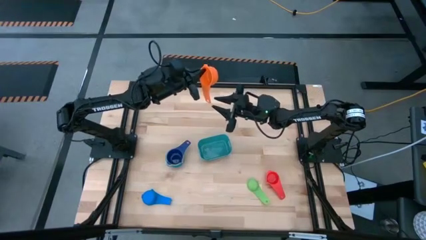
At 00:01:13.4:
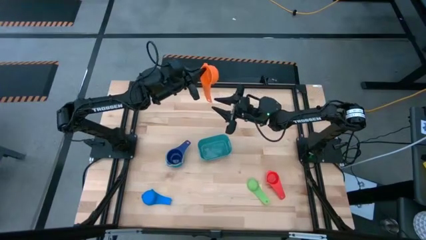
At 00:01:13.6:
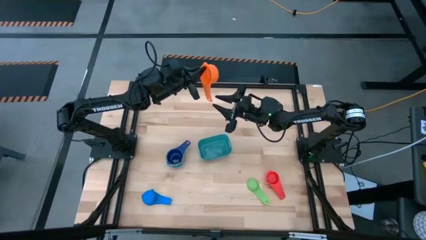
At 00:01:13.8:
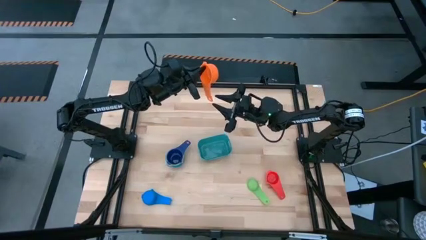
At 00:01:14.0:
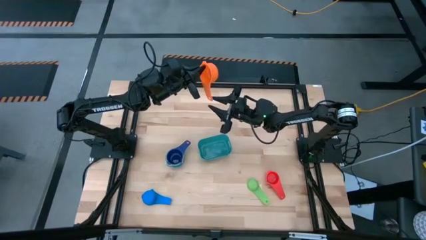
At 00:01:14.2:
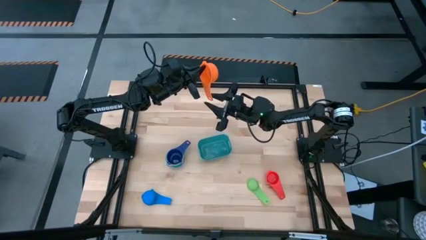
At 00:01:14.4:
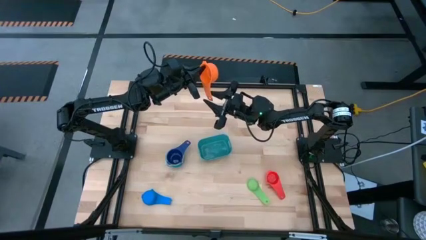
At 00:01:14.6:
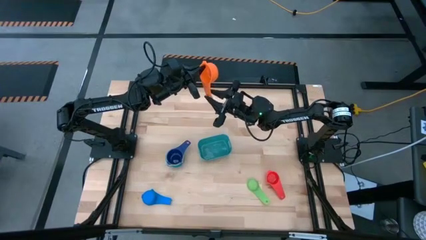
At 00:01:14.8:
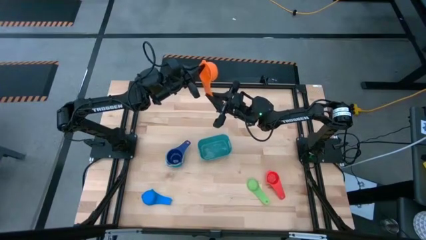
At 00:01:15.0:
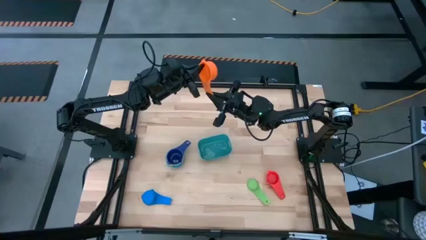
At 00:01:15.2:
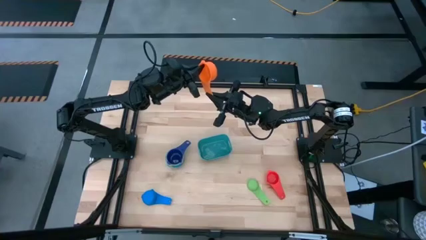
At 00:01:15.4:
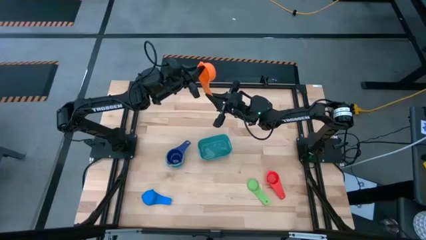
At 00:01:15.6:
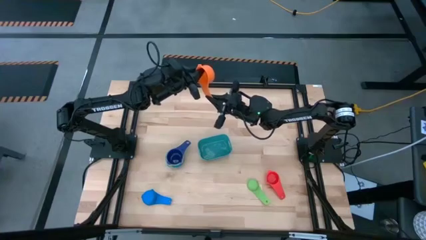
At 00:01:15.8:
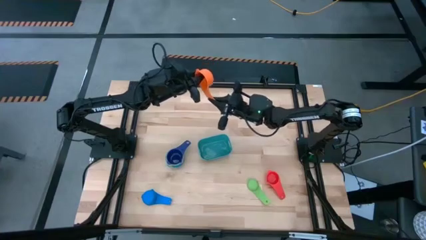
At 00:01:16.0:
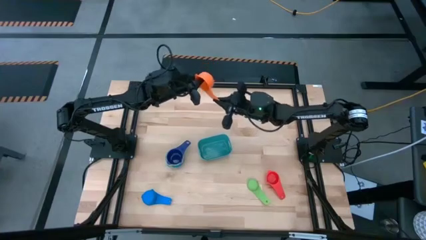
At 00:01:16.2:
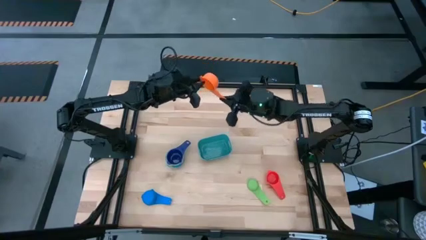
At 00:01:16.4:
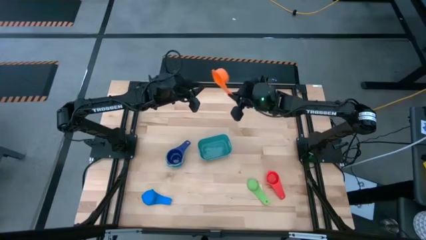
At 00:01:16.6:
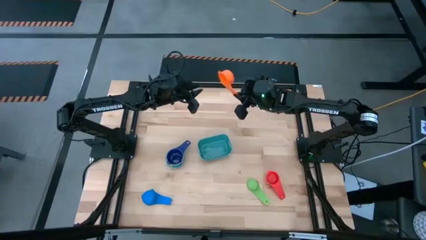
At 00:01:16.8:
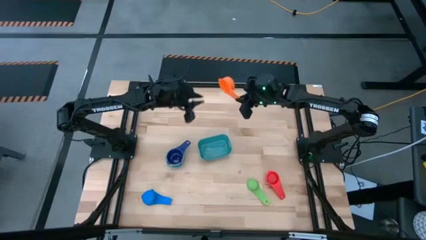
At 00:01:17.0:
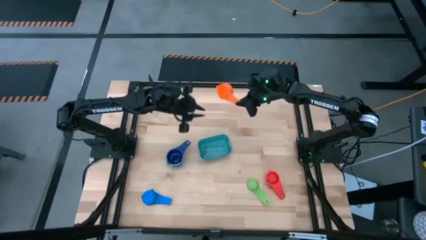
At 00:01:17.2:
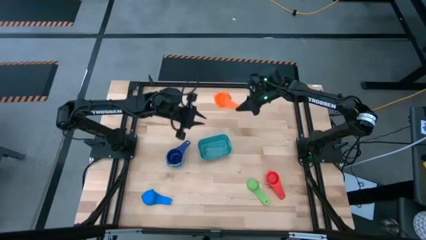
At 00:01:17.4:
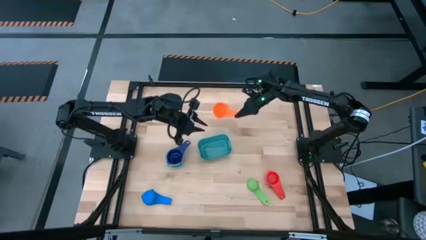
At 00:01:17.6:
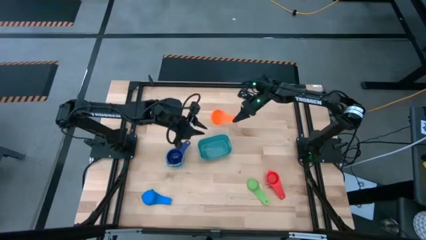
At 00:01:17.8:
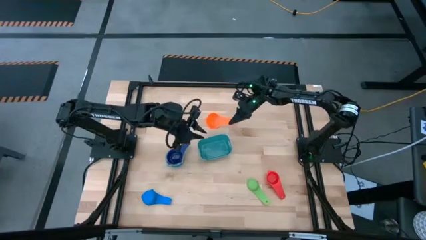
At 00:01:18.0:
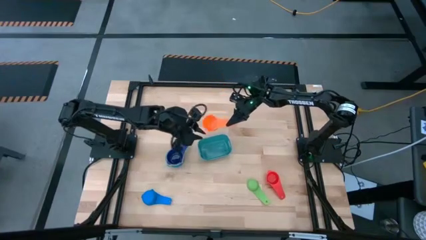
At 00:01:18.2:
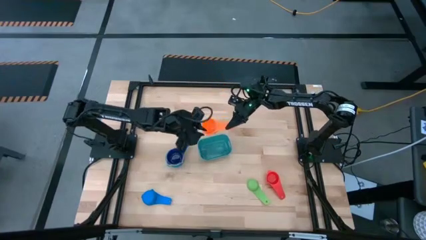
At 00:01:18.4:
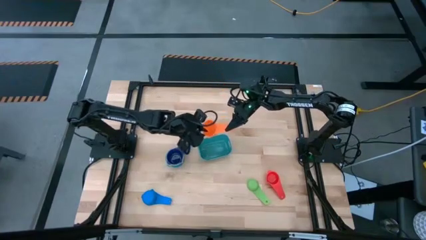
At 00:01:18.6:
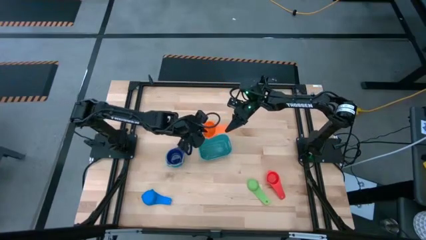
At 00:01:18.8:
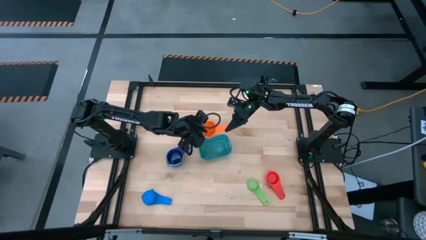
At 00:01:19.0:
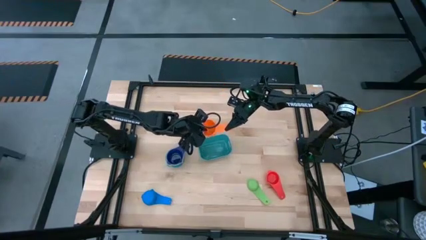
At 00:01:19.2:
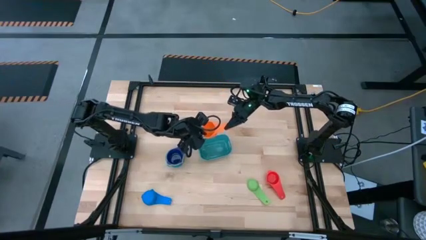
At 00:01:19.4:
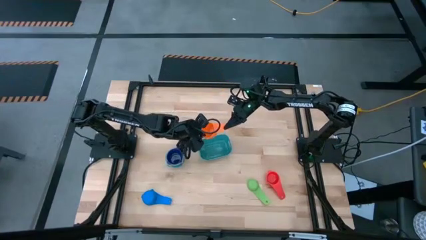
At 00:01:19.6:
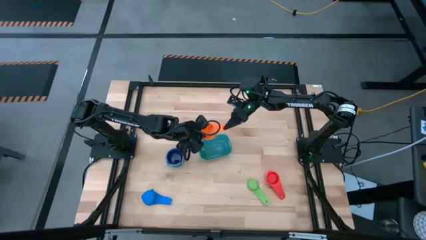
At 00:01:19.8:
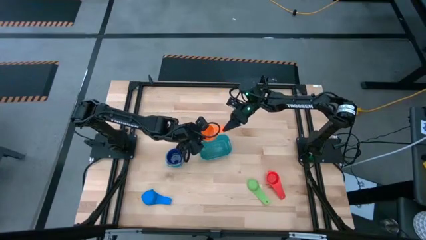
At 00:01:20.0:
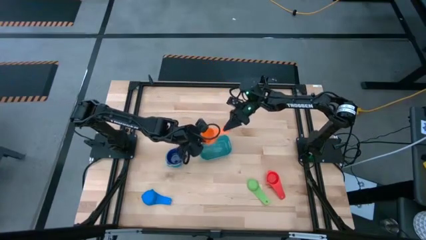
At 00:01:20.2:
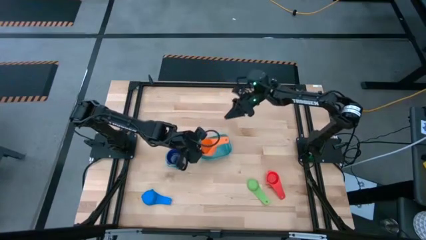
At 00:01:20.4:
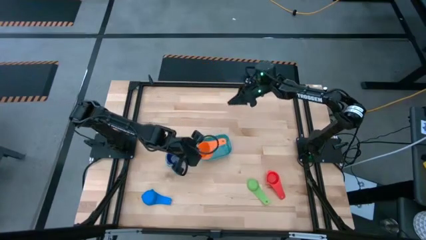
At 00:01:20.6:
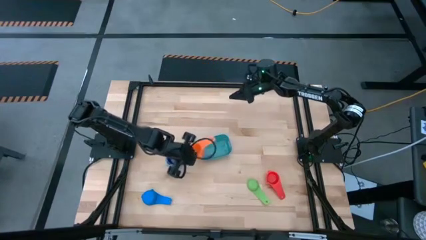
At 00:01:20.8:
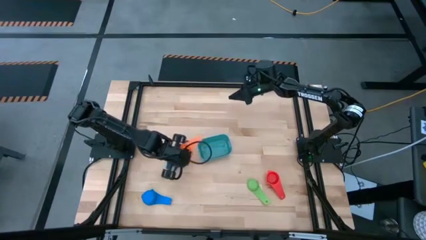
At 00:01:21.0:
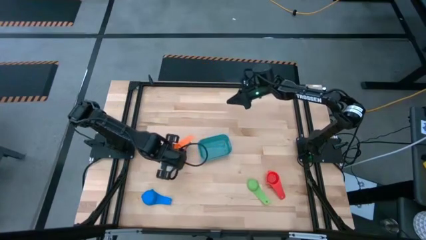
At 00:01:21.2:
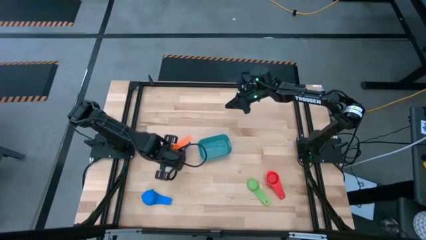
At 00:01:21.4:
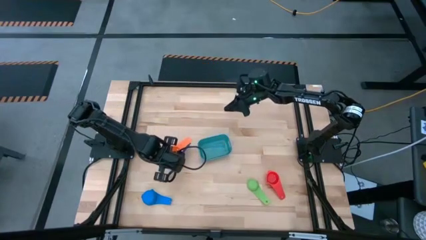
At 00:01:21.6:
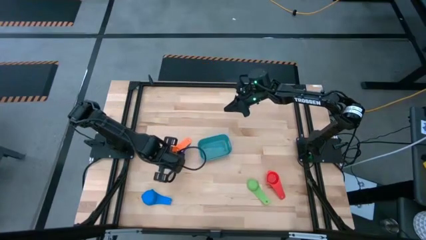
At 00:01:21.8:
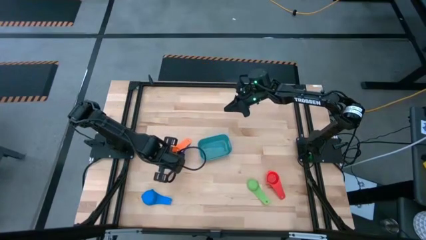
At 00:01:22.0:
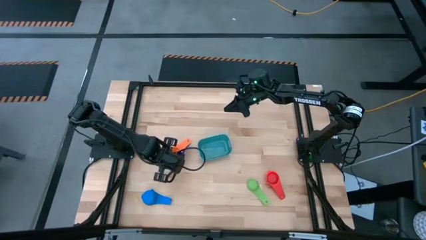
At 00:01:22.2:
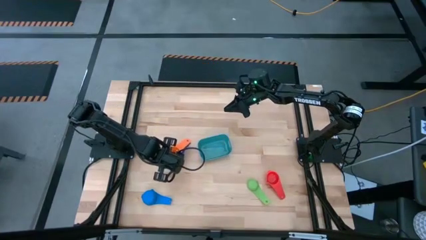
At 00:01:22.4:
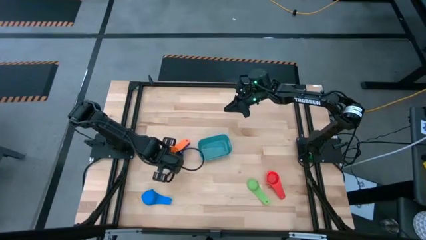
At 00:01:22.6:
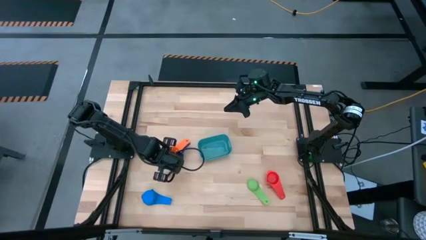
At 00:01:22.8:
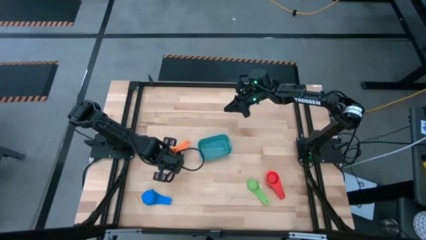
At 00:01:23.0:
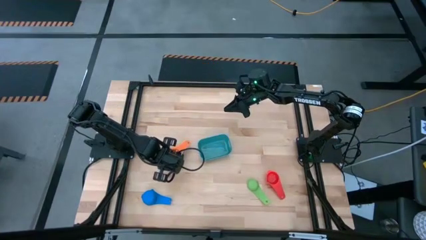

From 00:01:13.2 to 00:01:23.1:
Task: Nest measuring cups in basket
Stack the orange measuring cup on top of the dark blue measuring cup

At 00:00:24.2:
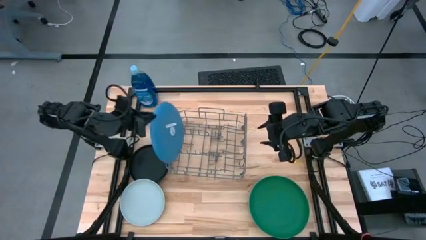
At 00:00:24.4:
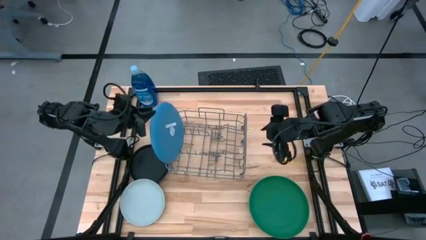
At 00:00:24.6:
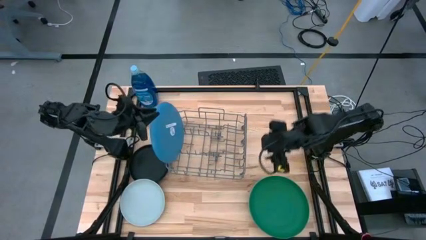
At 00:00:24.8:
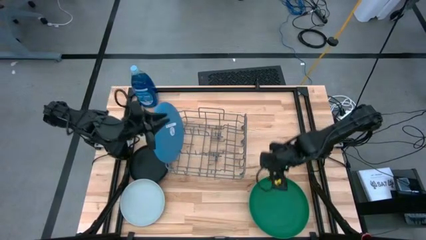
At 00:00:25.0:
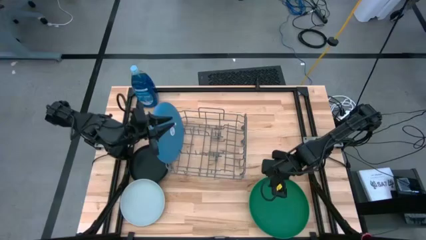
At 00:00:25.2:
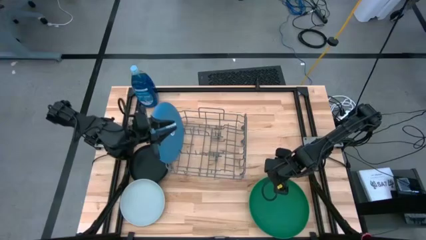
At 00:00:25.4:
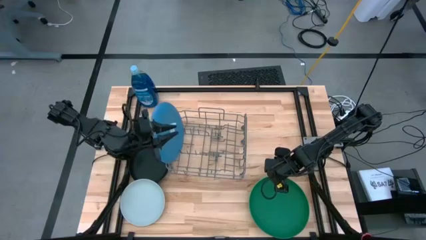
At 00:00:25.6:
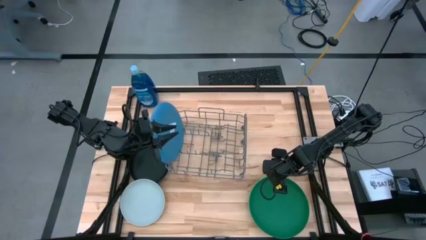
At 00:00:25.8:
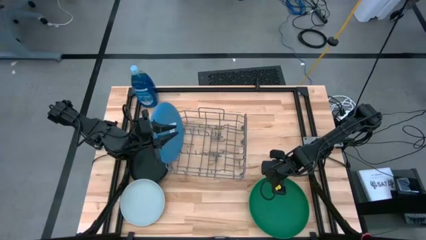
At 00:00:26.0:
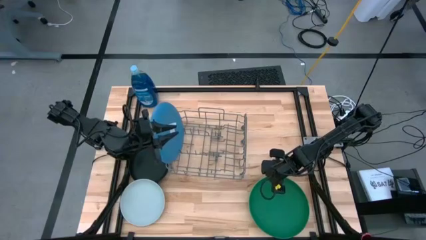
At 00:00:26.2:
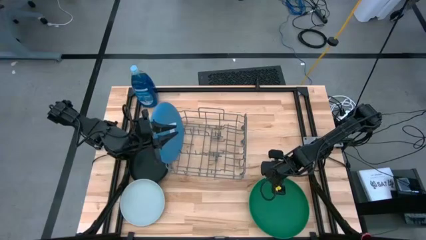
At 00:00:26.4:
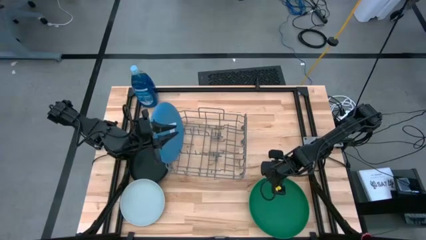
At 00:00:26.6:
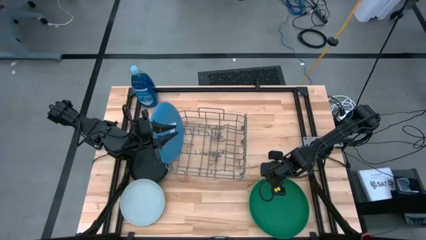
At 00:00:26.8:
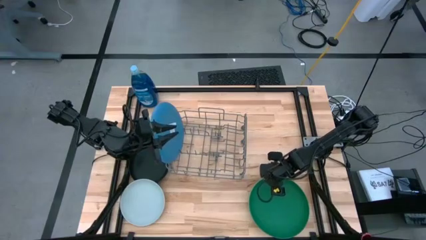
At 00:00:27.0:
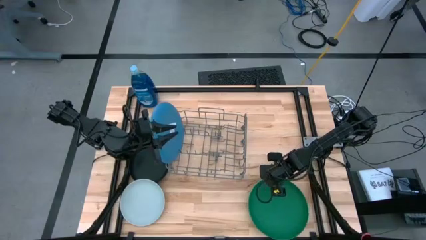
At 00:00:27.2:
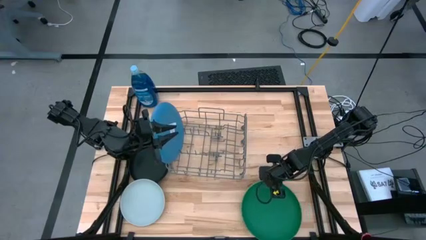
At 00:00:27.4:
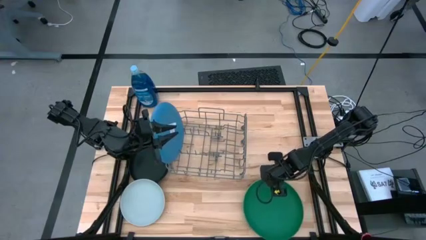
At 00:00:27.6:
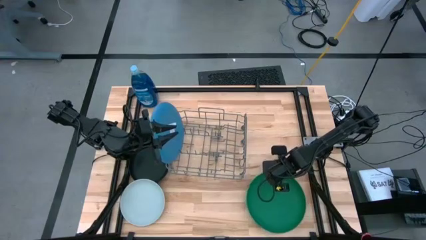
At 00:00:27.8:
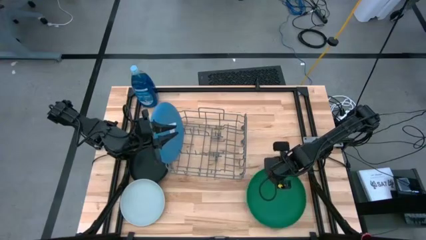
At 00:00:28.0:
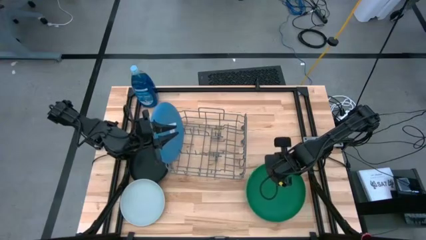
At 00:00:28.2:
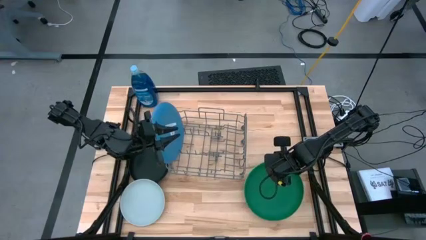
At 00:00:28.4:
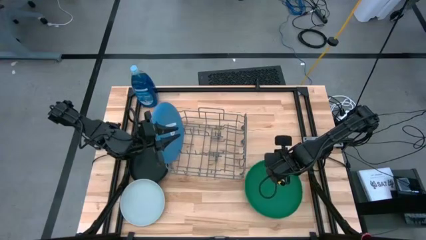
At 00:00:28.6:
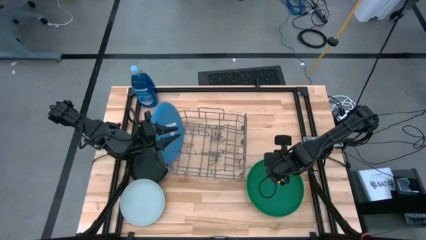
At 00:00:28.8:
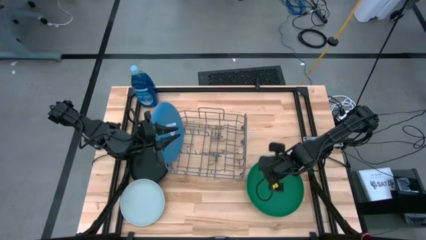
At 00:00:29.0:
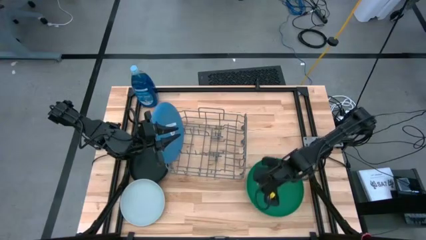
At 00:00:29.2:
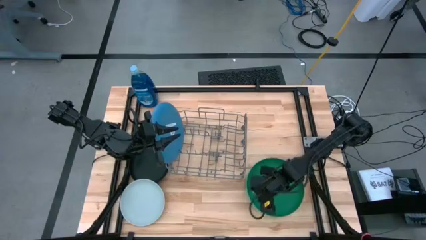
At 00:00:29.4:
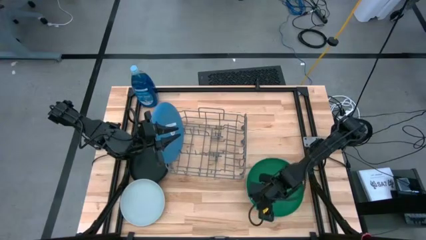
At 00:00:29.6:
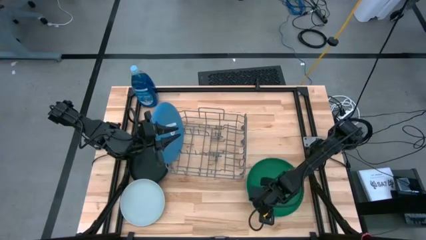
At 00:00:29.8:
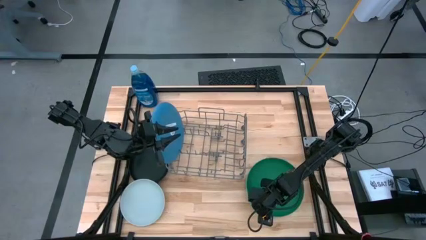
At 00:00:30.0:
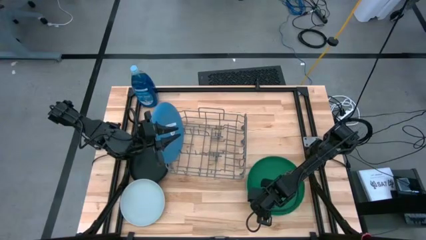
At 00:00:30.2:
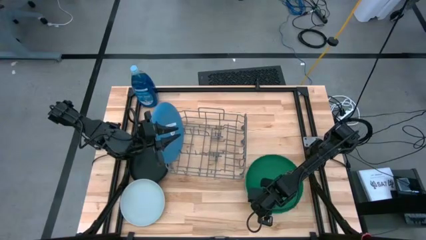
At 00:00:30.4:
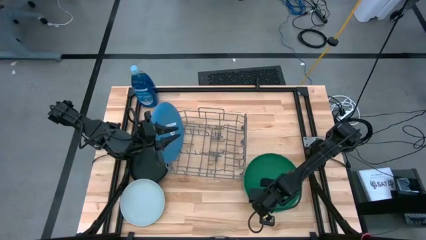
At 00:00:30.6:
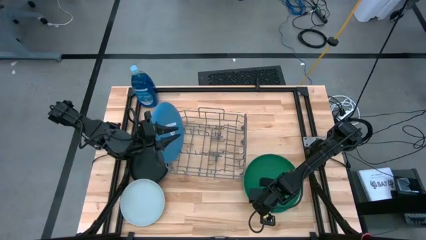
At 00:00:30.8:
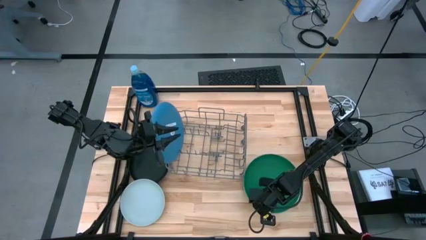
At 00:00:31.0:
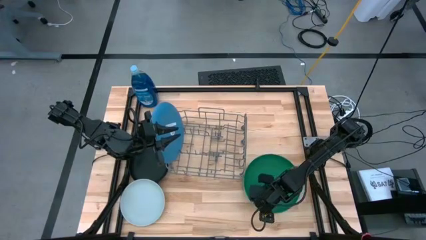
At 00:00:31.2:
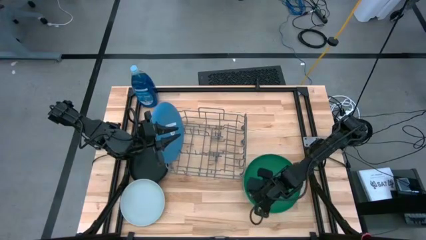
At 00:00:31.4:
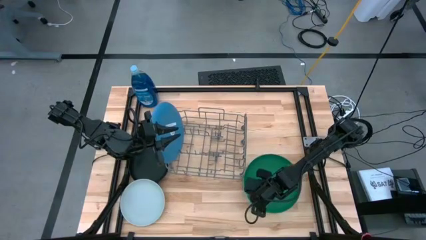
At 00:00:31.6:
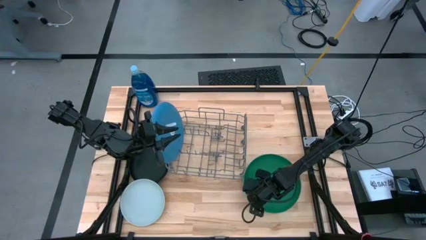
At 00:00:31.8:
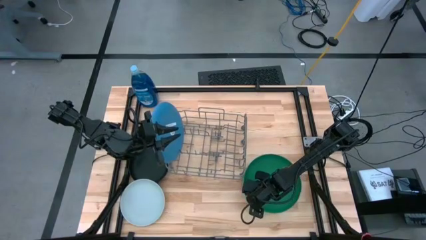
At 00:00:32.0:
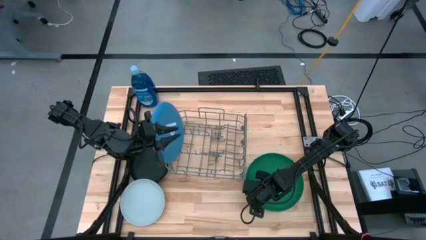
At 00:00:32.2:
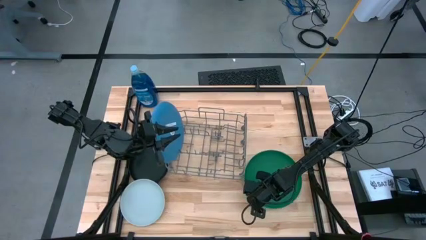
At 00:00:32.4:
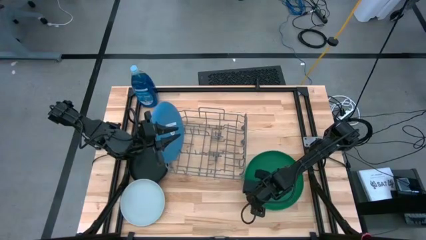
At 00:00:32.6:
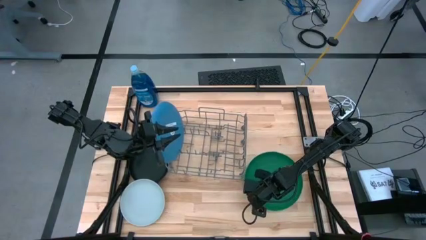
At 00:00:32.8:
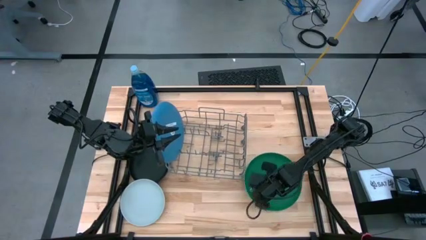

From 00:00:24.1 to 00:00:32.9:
Task: Sort dishes
Put the dark green plate into the gray dish rack
